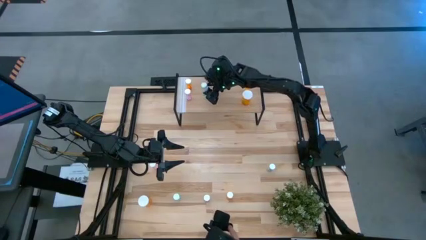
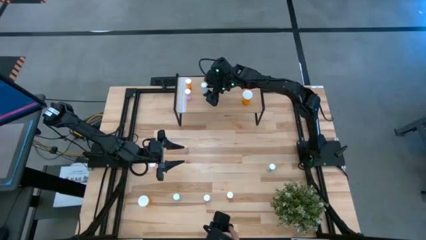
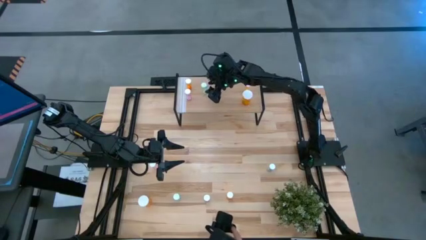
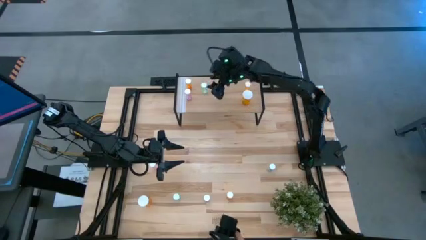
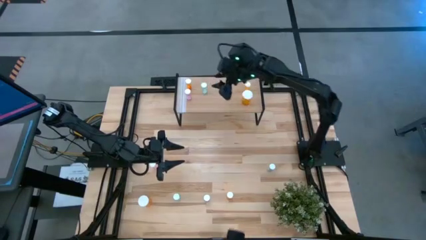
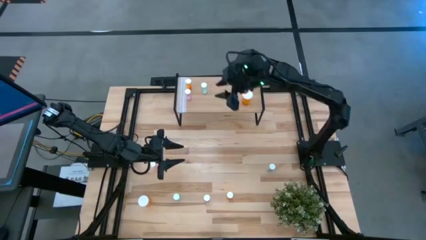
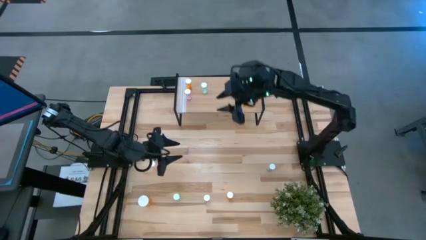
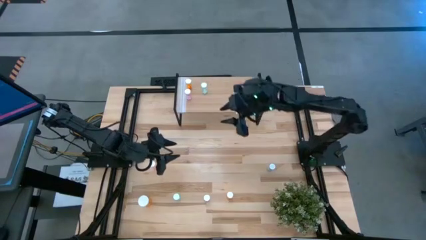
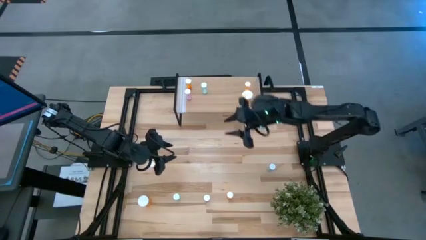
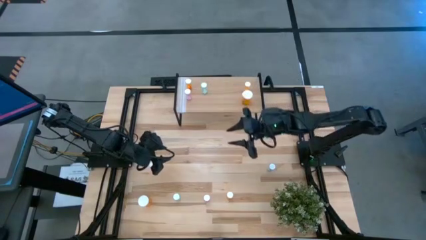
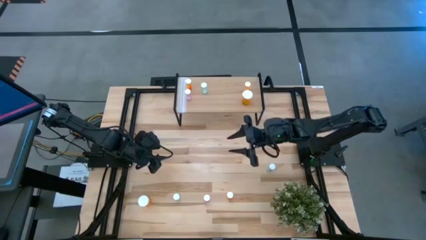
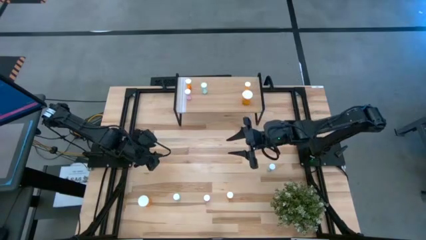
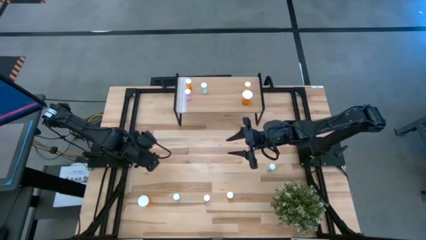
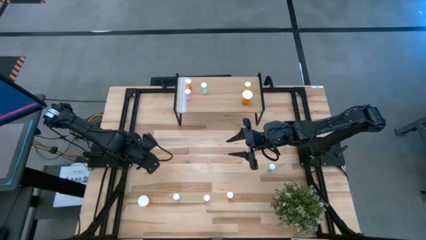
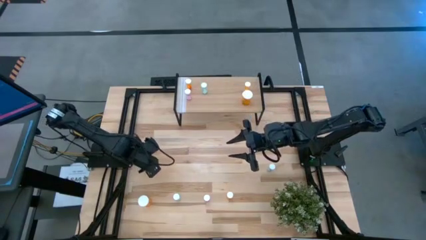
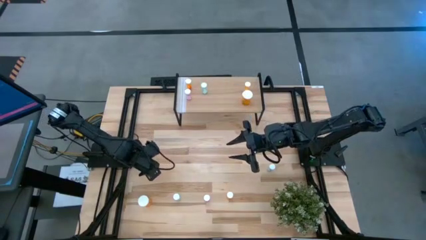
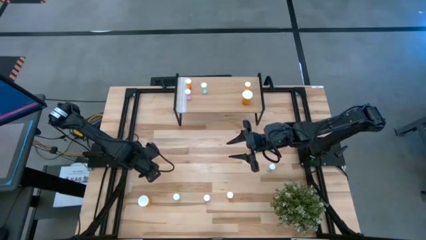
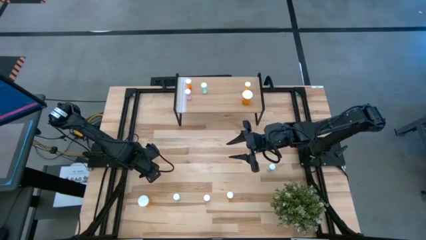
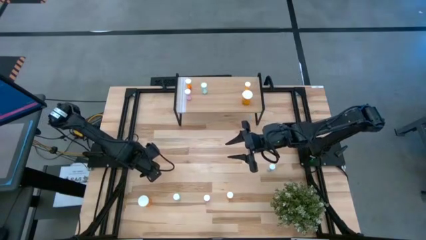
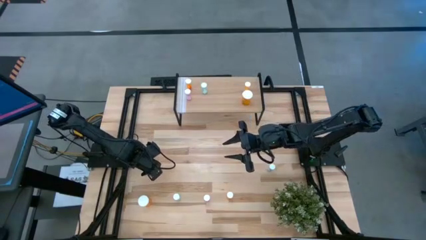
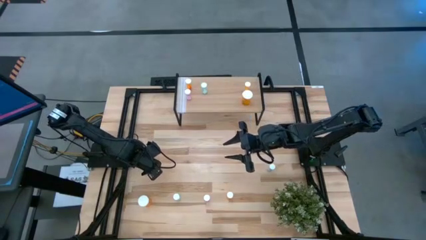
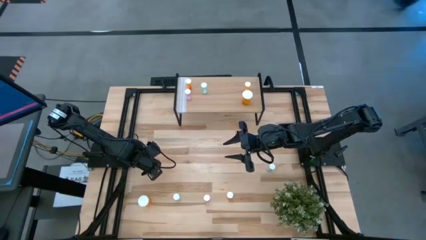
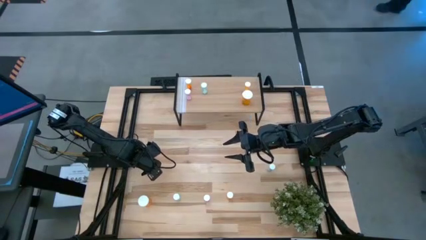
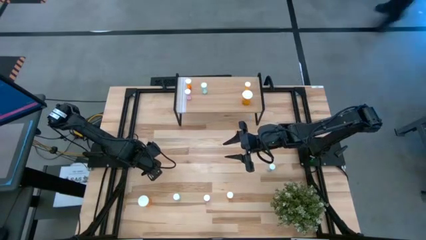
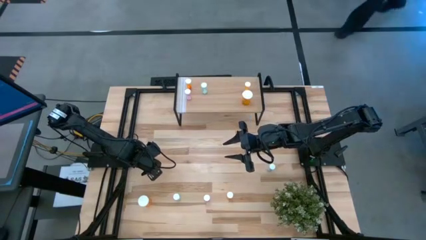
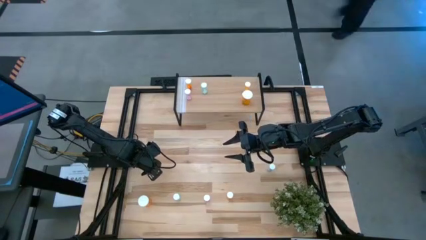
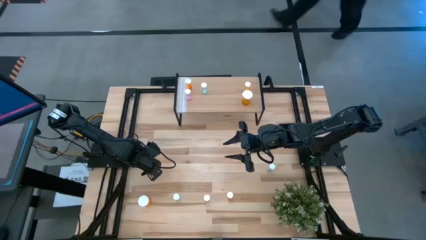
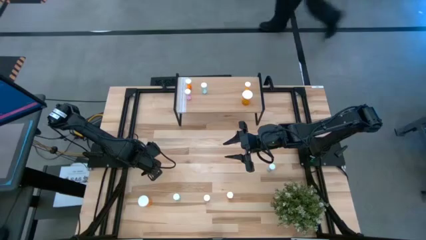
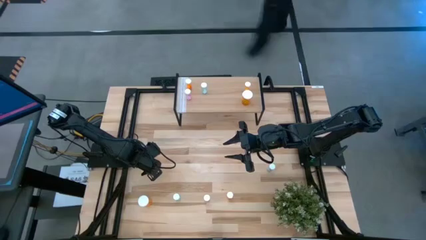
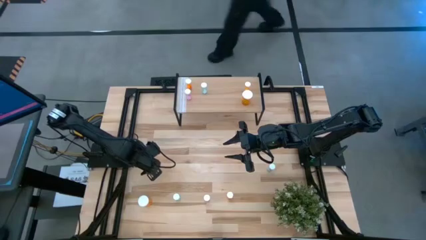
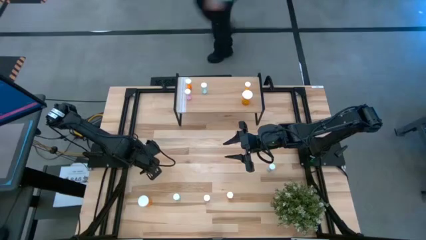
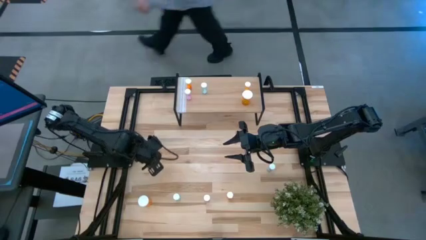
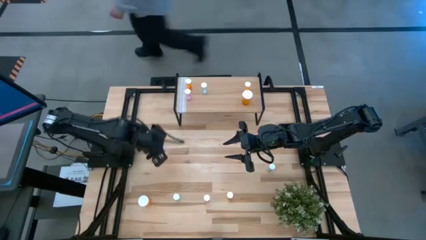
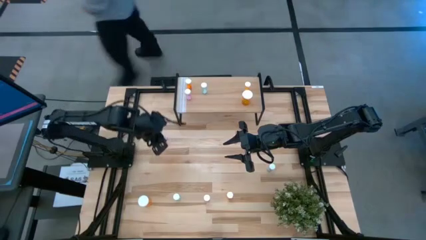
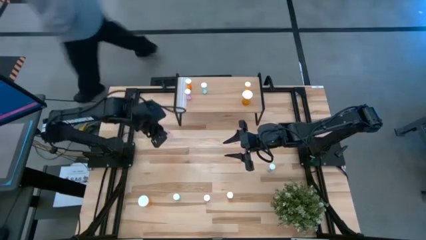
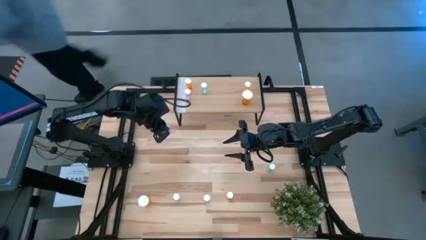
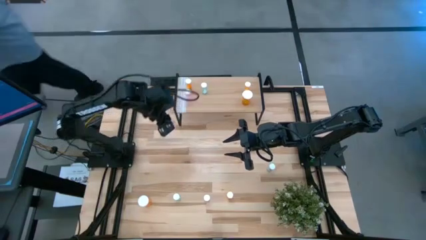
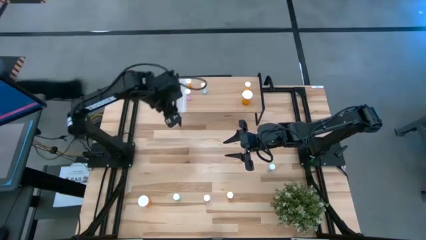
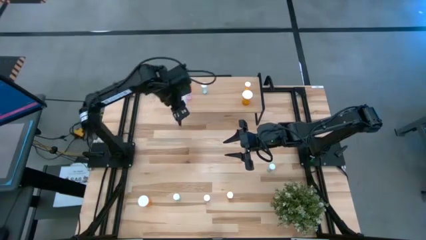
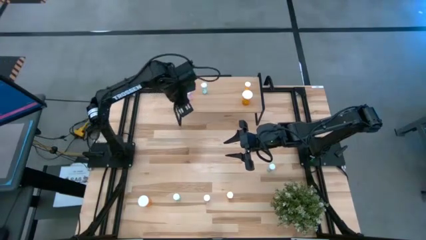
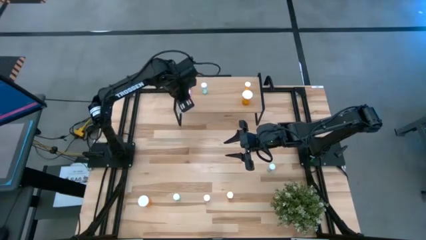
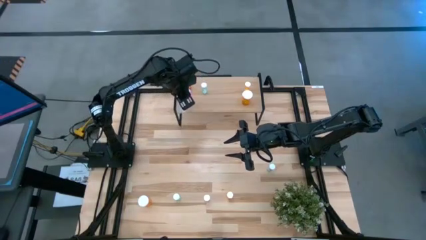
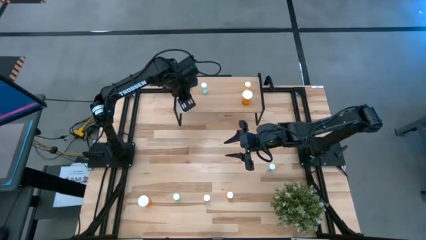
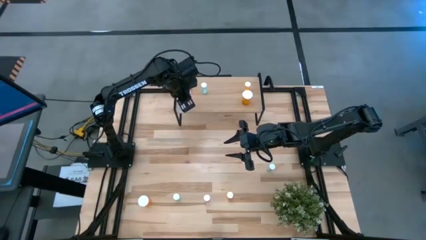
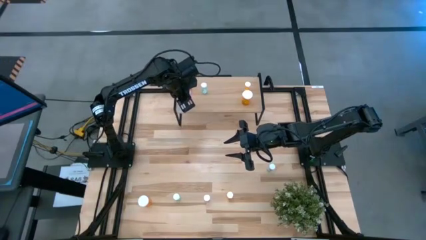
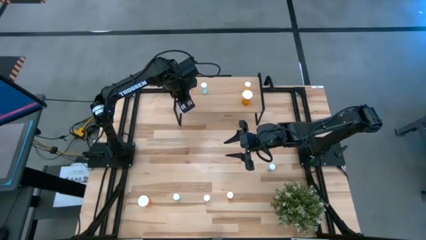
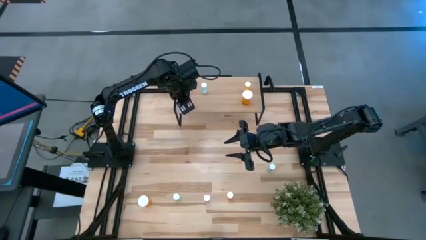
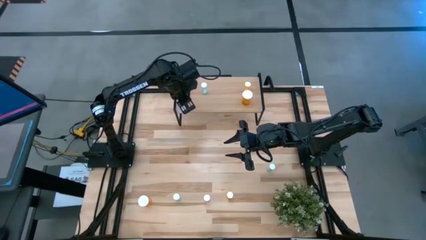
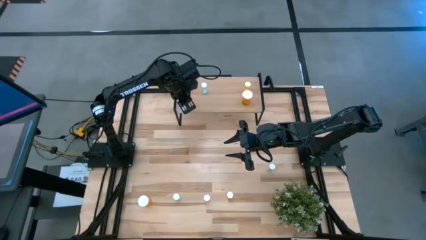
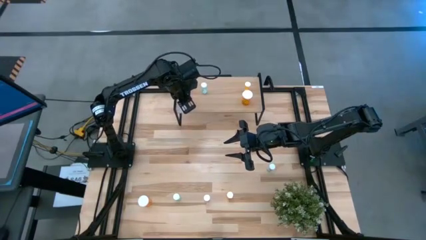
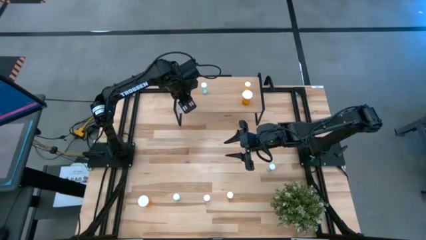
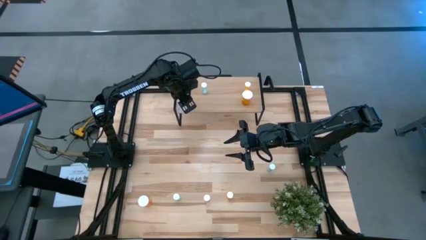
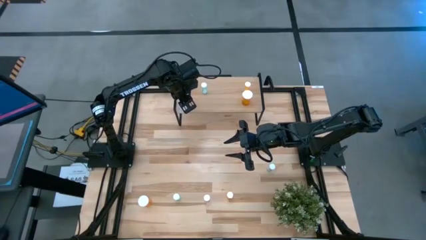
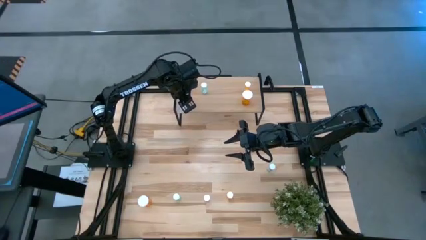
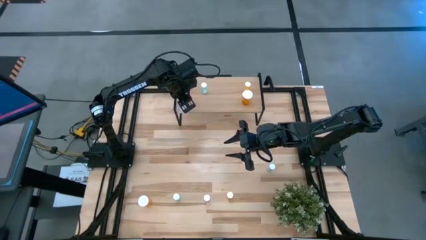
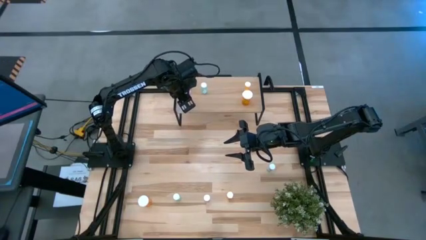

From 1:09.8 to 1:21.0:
Task: Pick and place medicine bottles onto shelf by color
Put the top pink pill bottle on the shelf

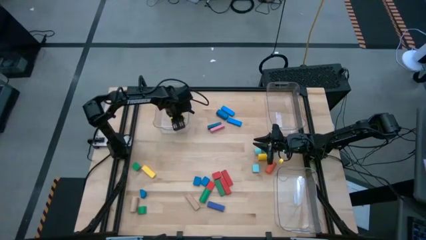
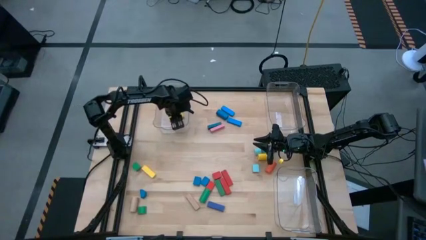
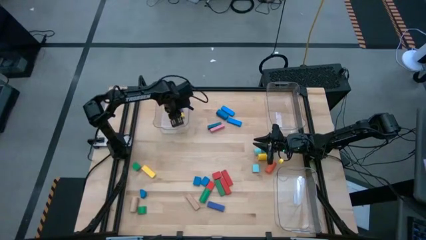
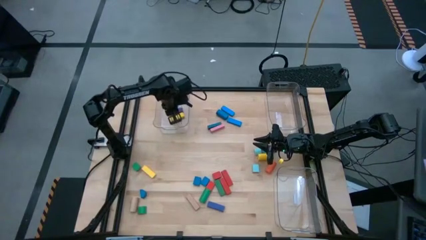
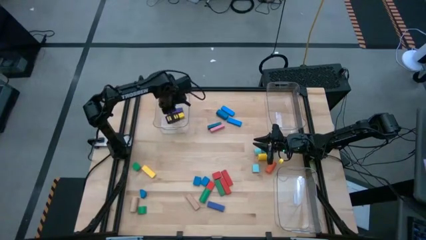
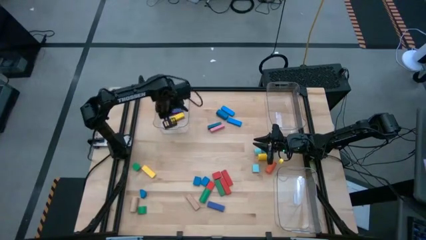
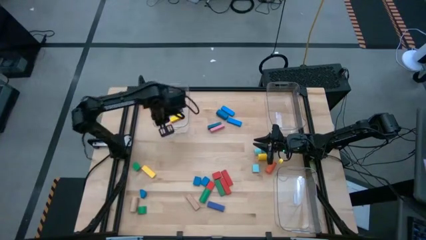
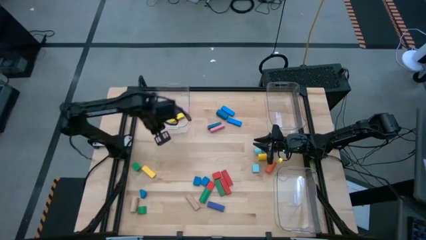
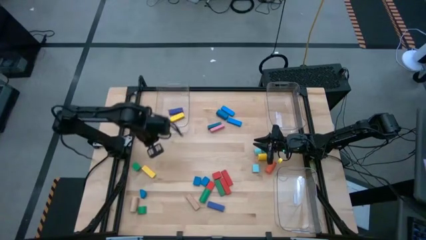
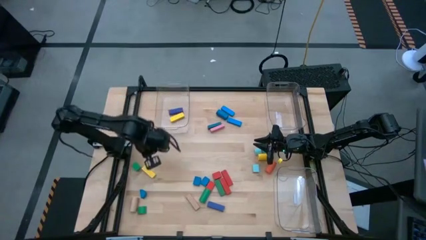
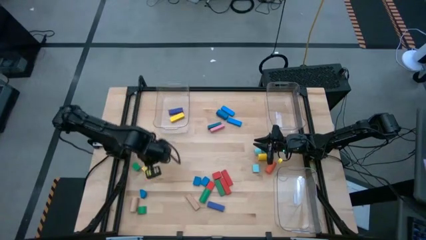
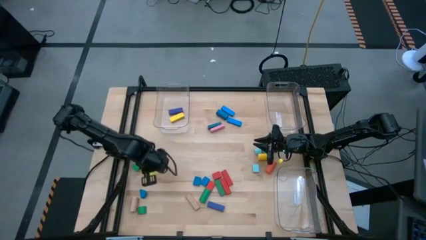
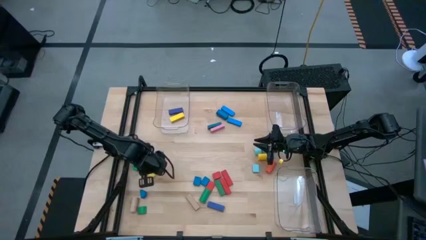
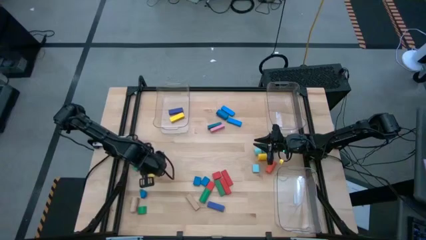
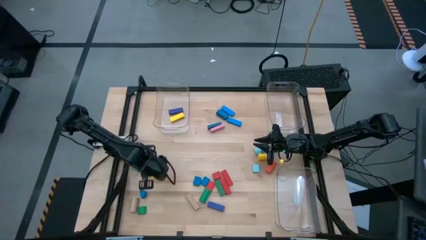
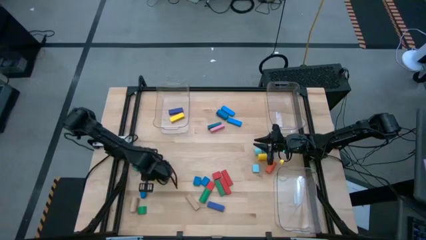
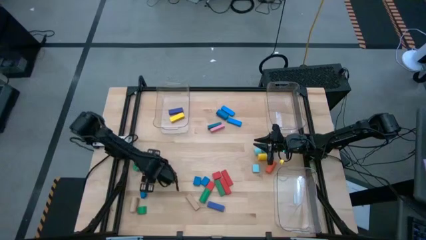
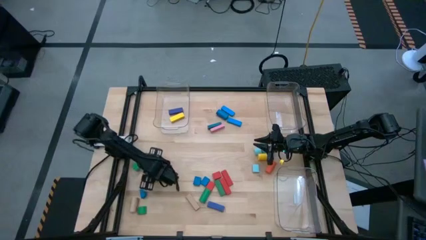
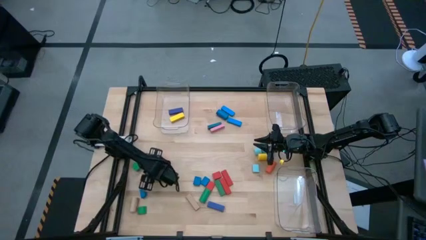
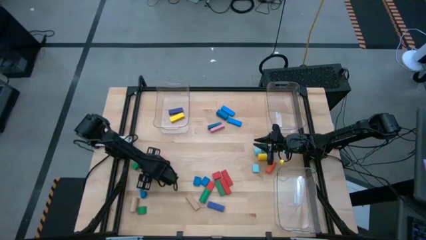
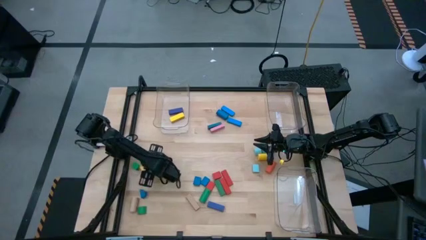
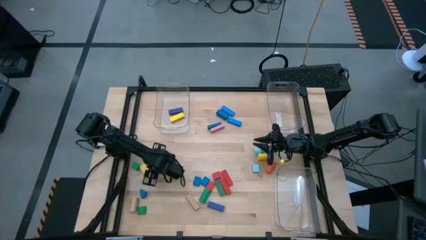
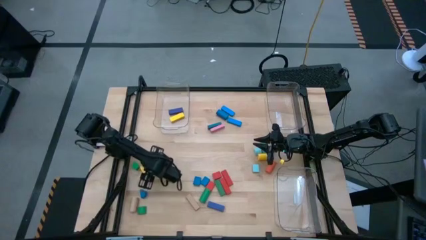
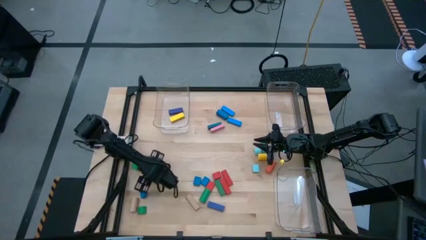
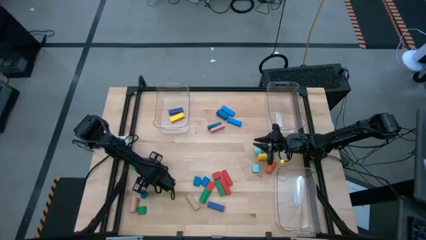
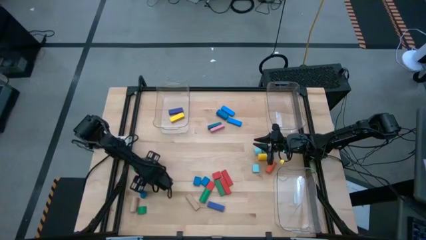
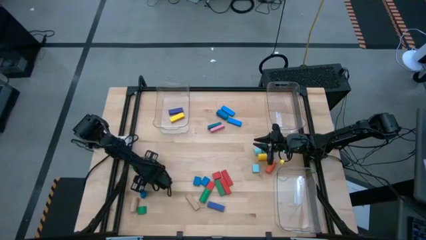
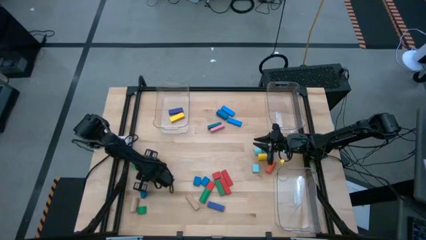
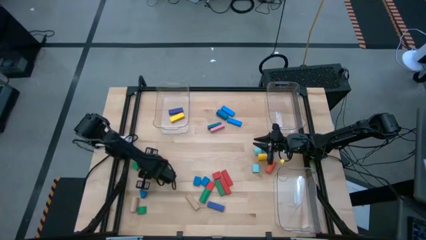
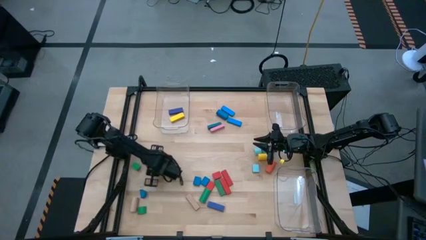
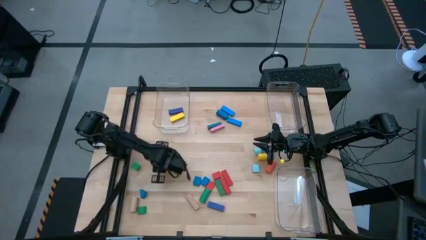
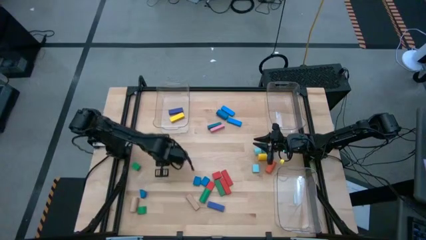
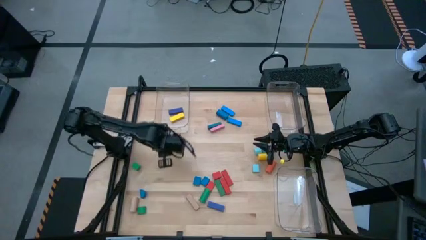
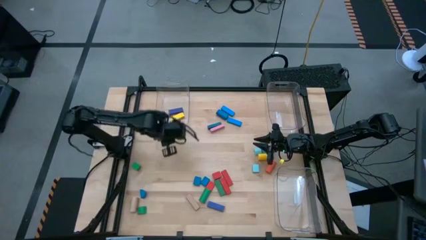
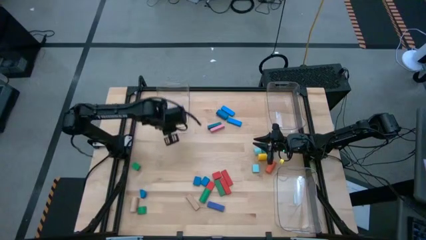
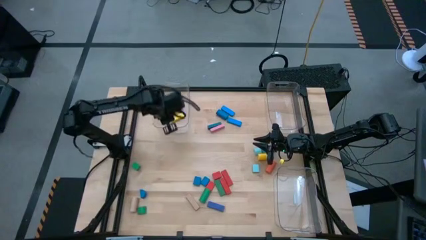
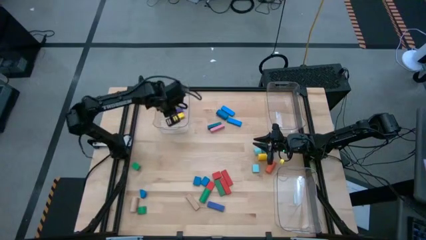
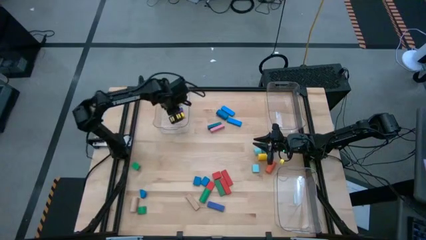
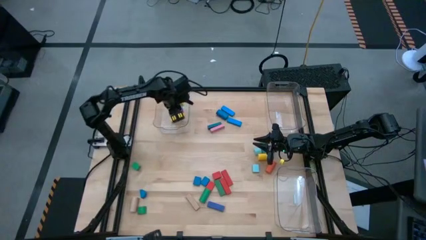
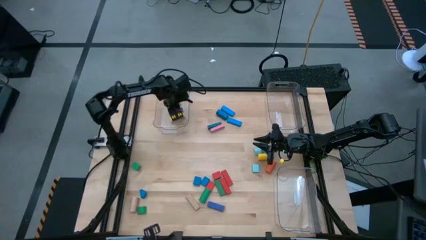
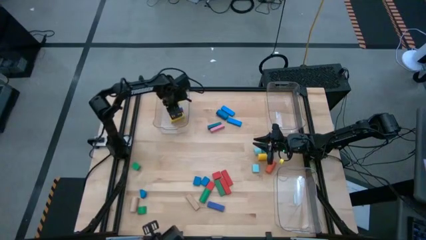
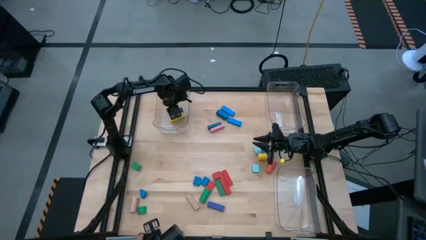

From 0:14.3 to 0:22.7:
Task: Sort blocks by size
Put the yellow rectangle block into the top left transparent bin
